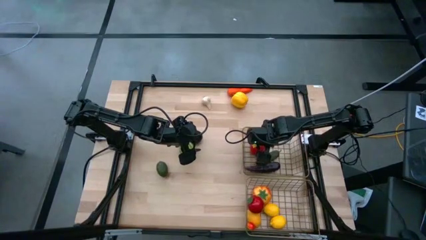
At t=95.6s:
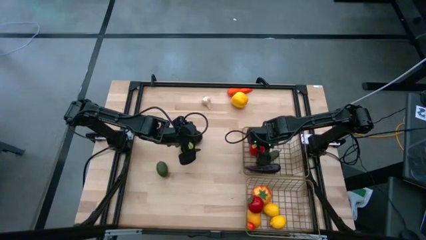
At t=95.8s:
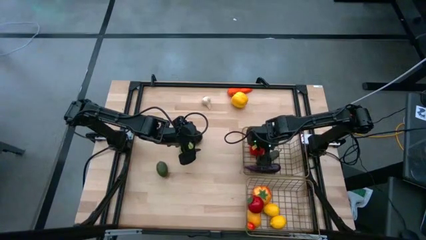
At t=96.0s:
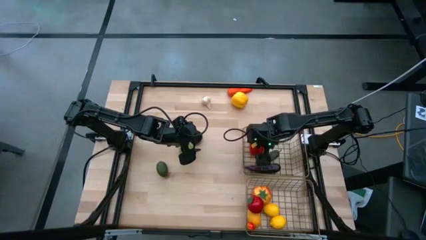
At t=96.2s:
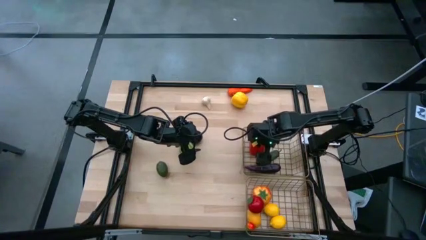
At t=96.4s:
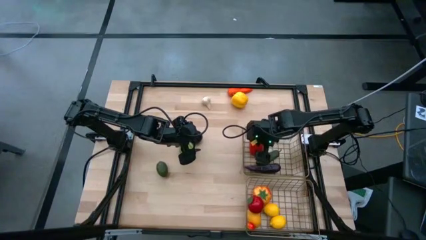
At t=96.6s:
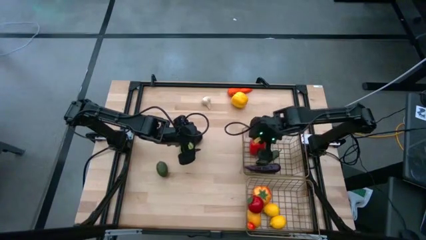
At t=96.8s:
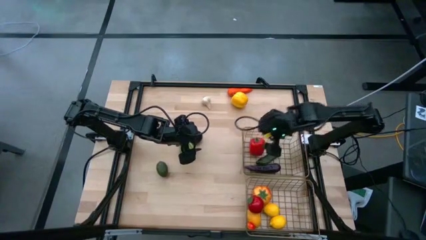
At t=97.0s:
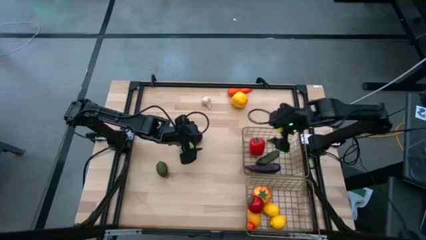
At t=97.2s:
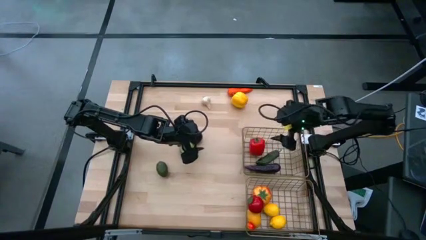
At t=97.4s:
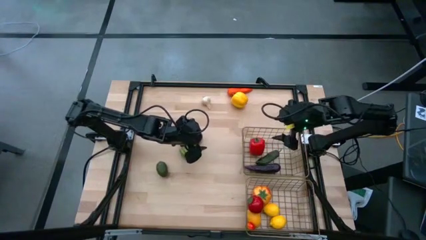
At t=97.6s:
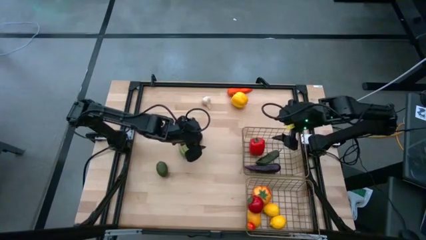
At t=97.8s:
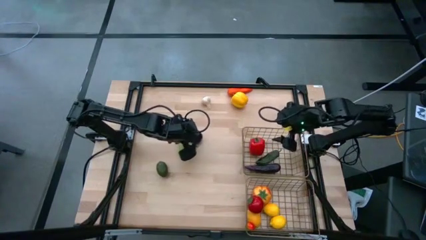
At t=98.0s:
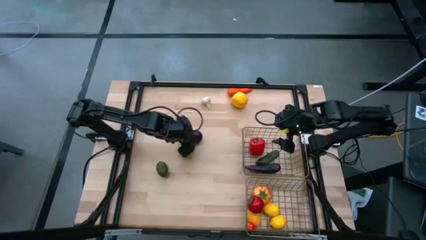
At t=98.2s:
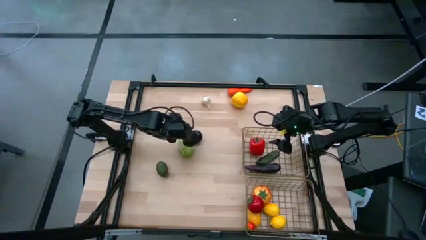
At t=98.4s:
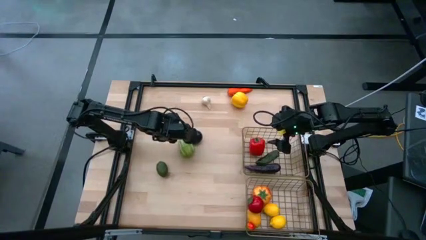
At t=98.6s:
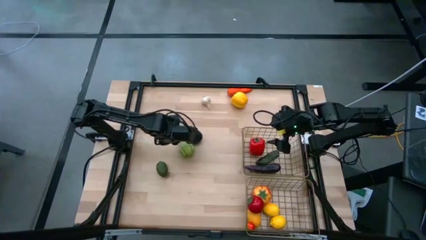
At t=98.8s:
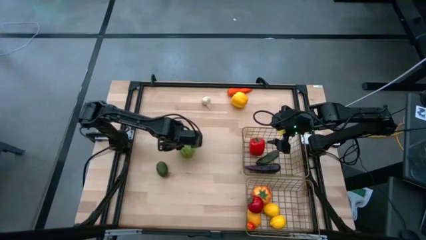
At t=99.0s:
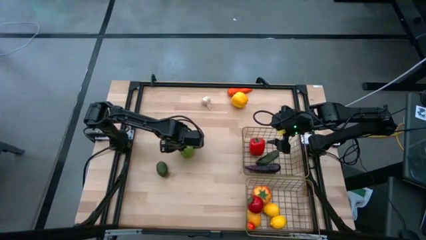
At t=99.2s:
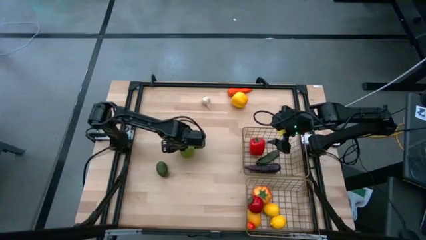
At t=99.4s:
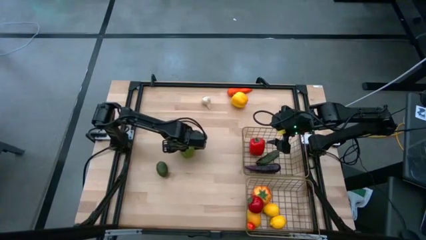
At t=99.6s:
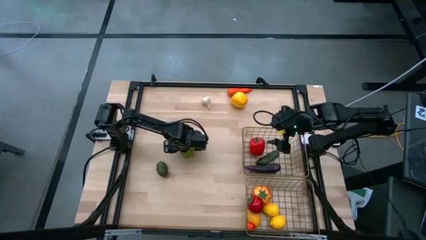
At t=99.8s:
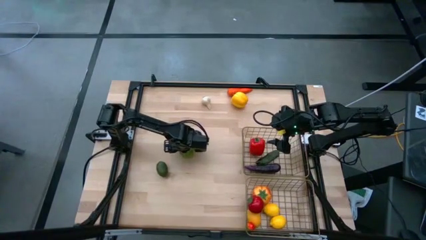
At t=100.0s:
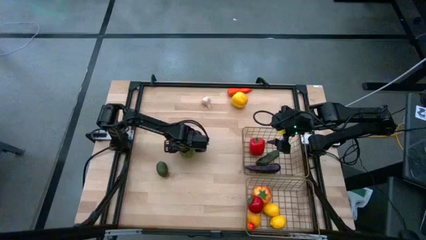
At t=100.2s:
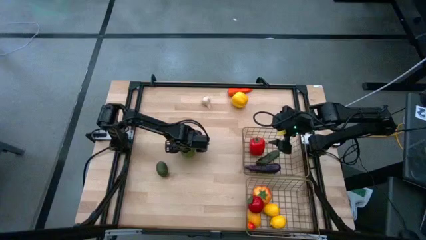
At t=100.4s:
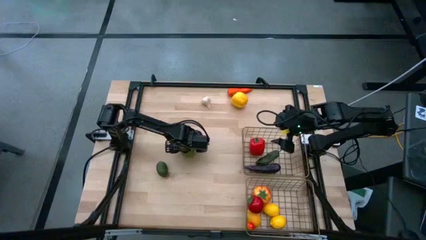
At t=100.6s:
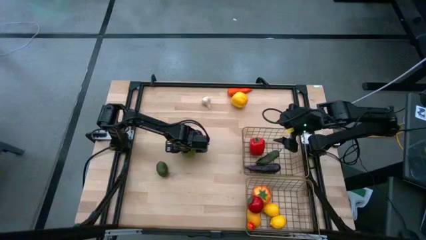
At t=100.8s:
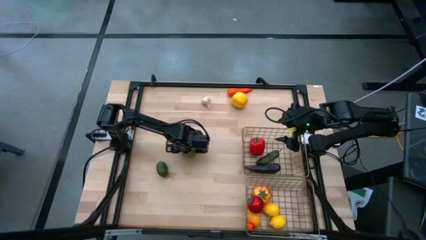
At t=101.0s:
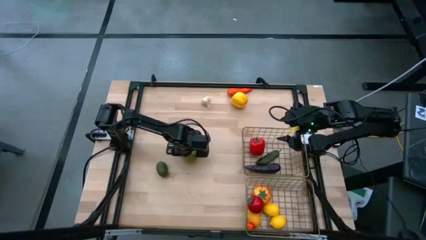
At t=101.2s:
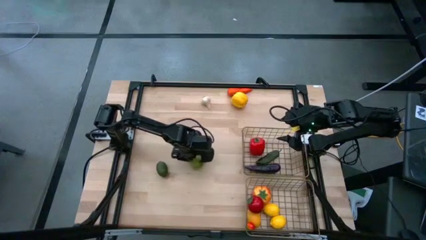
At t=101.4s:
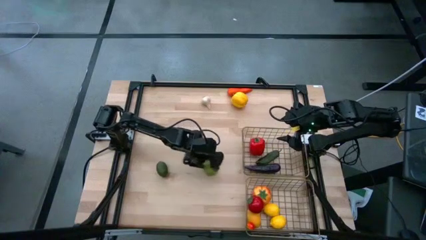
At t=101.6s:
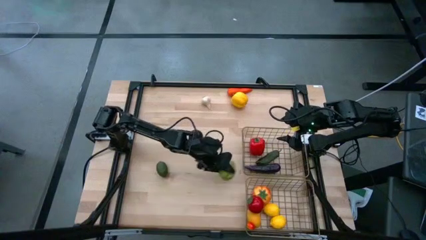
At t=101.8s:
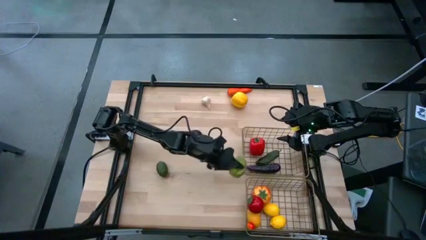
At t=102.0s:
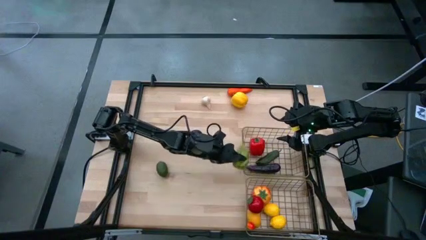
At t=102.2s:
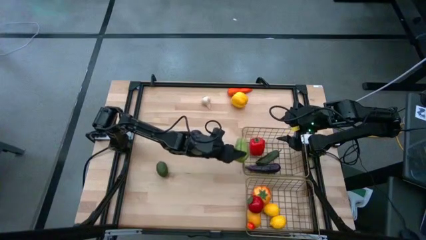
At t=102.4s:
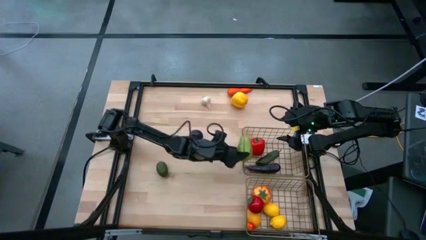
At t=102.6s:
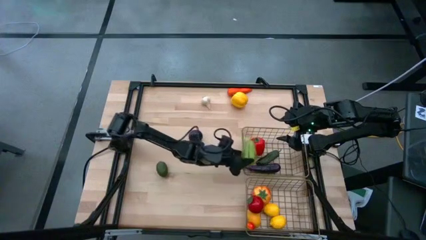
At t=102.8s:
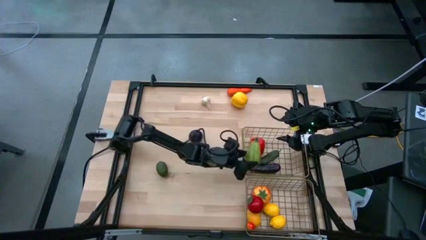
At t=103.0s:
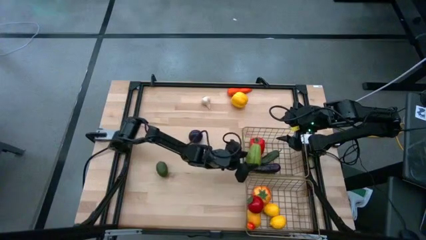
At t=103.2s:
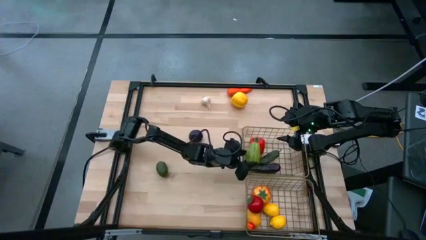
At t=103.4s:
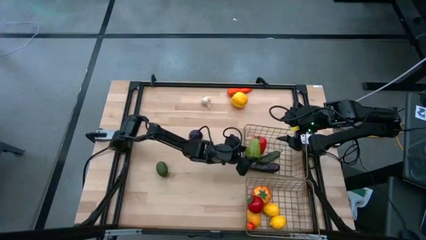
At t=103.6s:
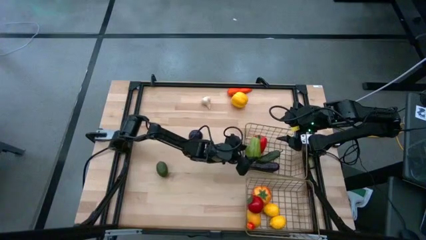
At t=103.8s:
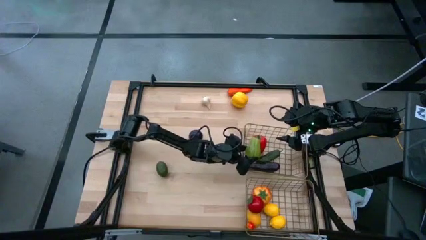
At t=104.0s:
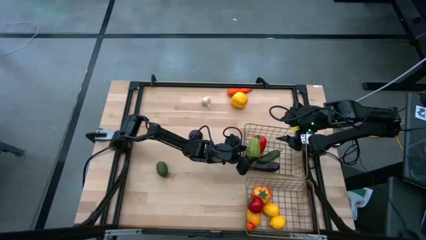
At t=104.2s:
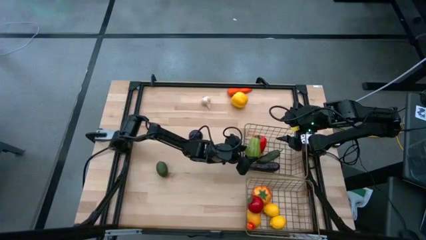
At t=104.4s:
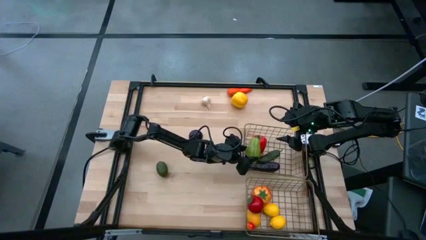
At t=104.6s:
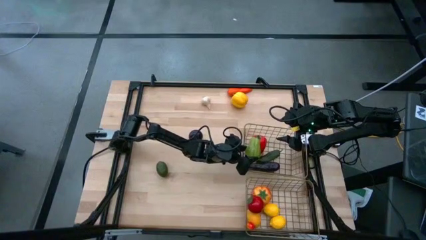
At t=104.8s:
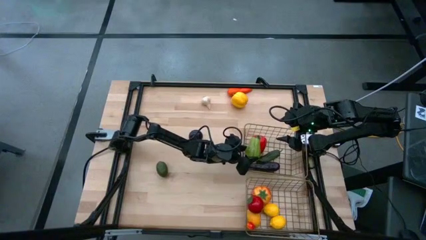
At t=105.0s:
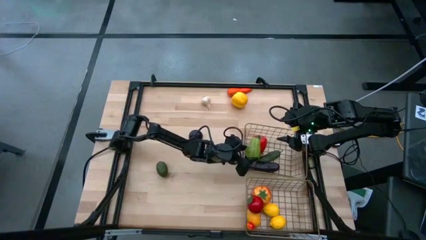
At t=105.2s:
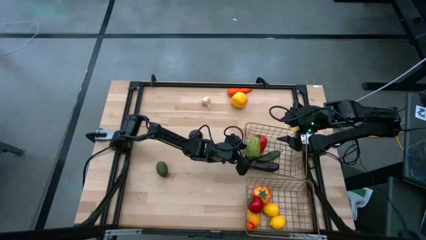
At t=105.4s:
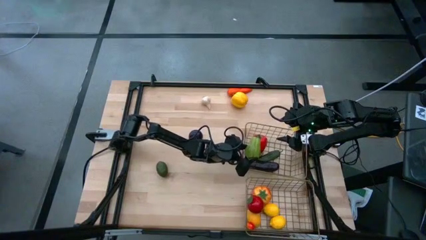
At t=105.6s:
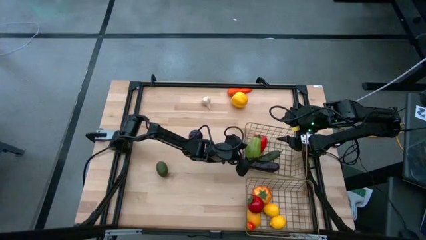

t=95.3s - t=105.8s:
Task: Sort produce into baskets
Put the chayote into the top wire basket

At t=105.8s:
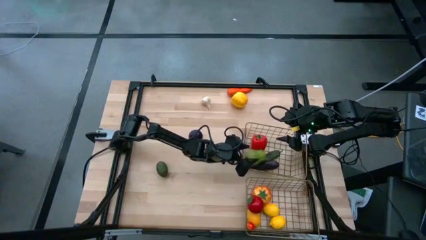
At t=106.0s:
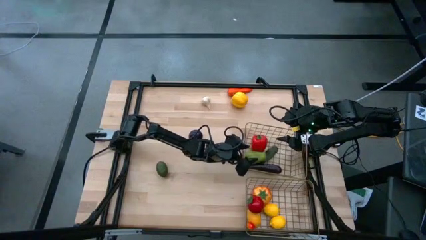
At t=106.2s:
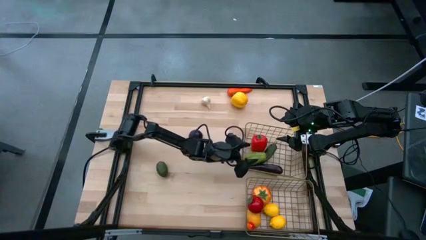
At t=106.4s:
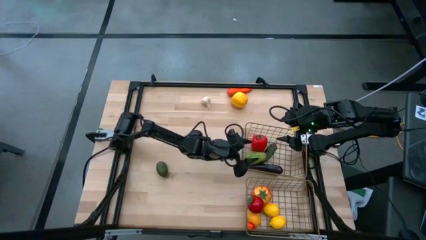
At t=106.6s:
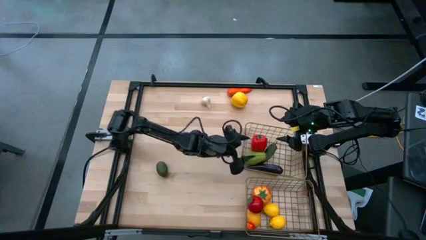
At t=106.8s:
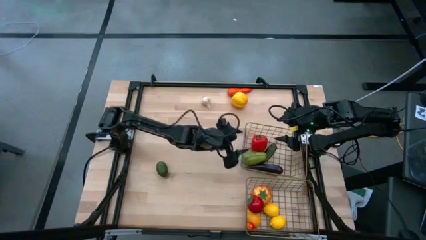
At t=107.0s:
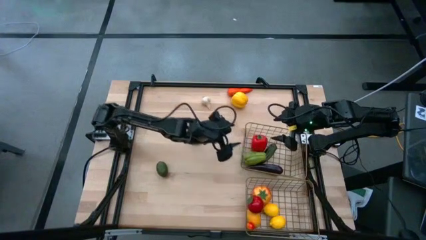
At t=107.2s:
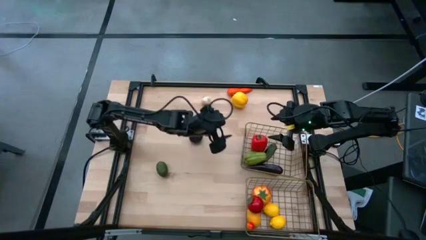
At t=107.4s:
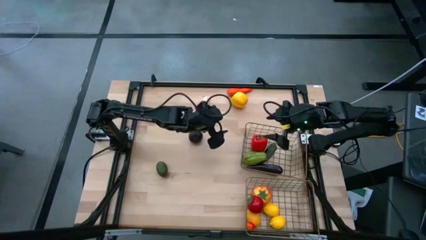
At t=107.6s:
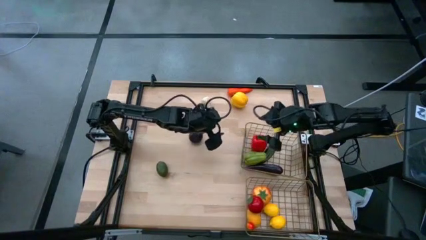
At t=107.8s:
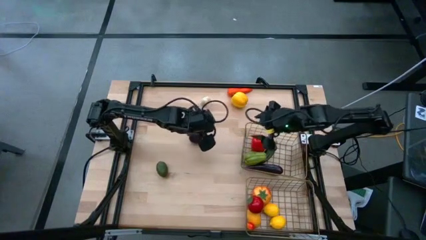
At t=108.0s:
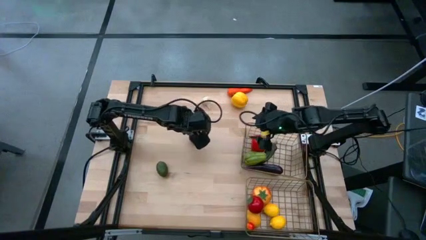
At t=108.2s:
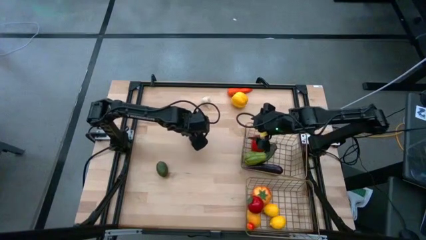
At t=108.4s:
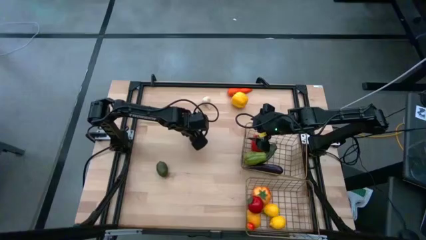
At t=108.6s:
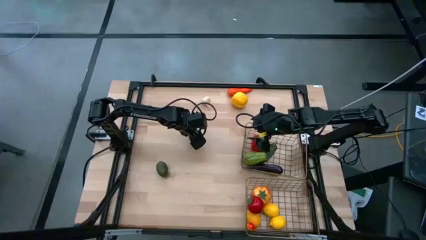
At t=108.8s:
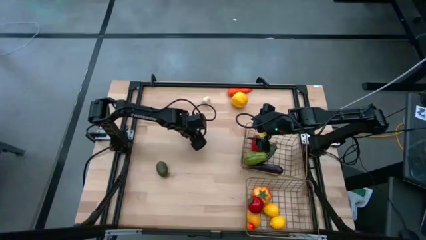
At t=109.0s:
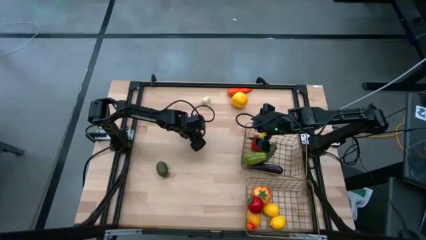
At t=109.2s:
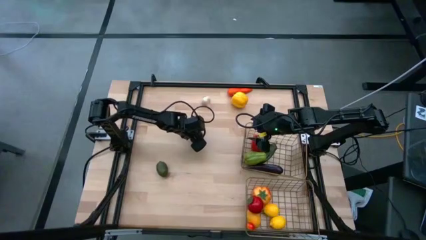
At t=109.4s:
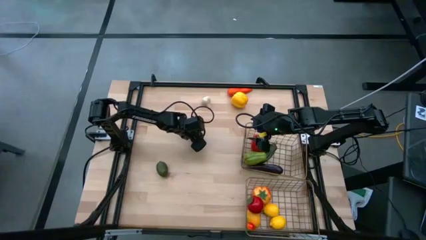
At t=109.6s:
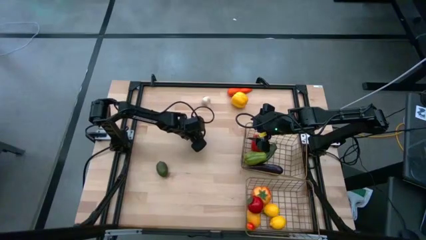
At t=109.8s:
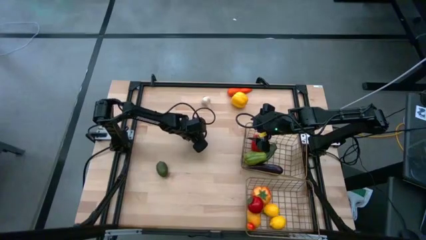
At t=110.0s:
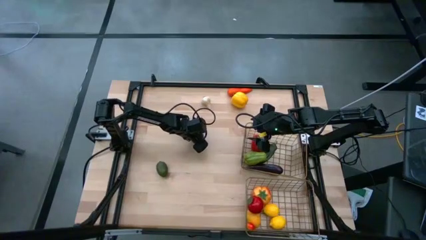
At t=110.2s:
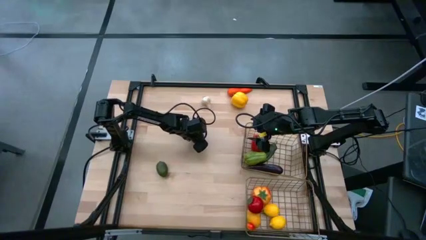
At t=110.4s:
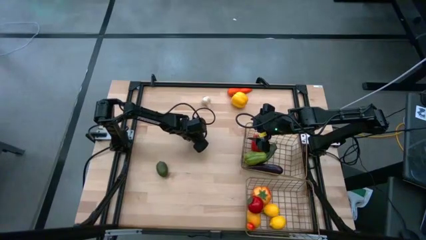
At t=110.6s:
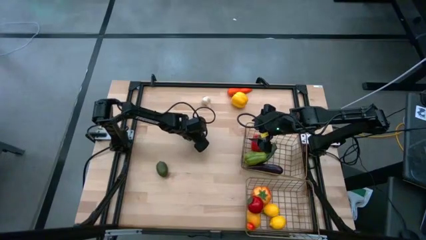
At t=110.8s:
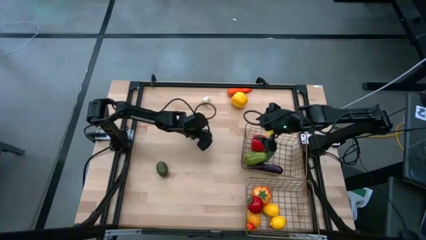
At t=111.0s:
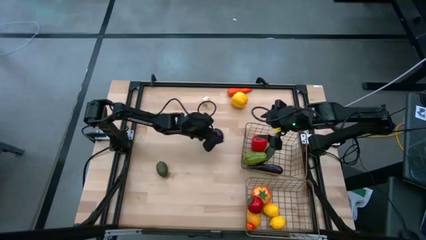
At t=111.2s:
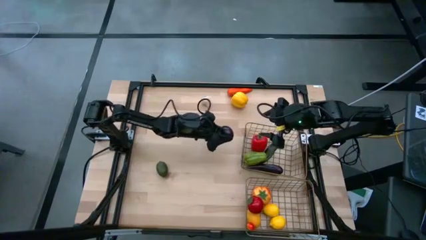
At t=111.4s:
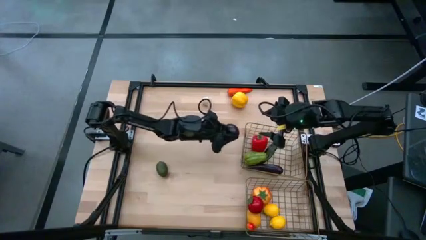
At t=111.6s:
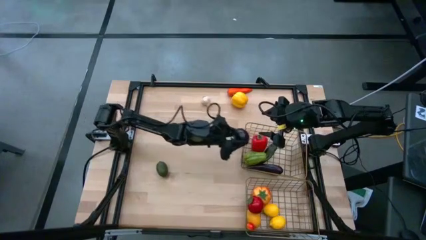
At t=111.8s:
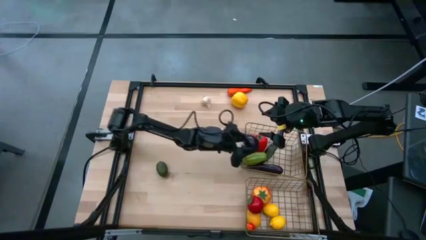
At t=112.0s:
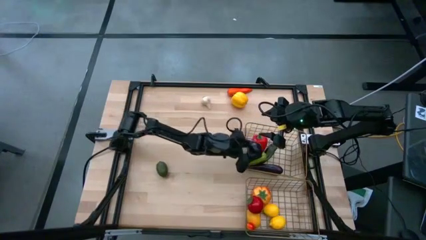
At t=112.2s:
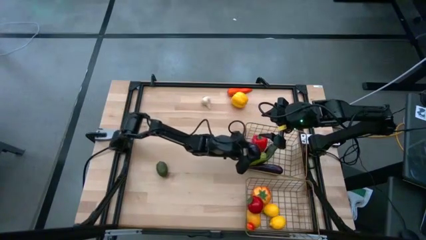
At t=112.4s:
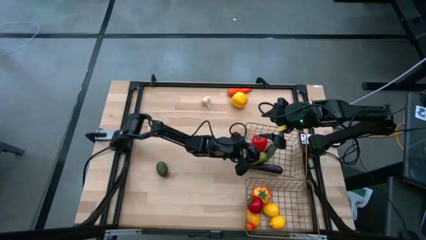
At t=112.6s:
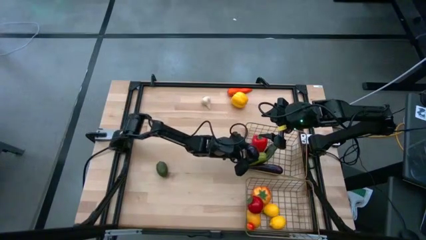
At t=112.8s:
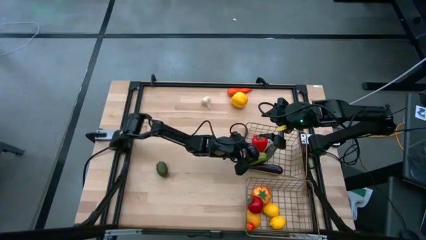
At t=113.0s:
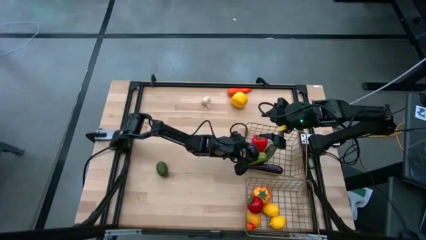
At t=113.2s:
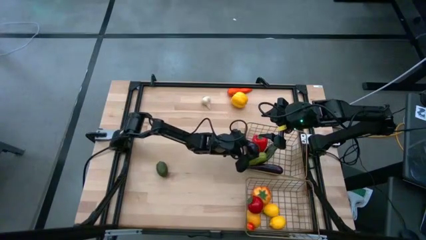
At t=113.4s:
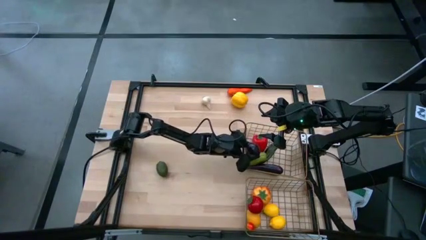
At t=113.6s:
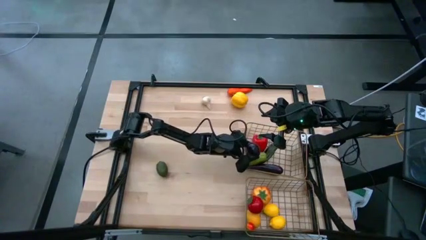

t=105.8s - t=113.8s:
Put the plum into the top wire basket
